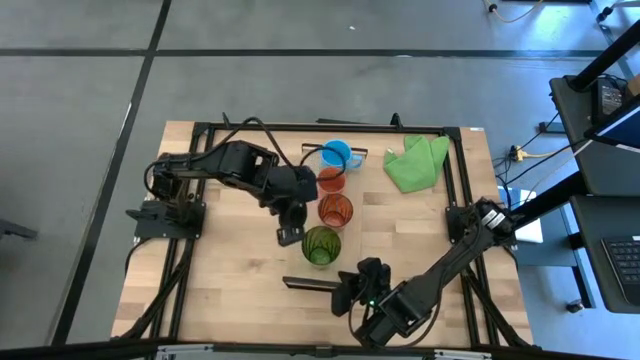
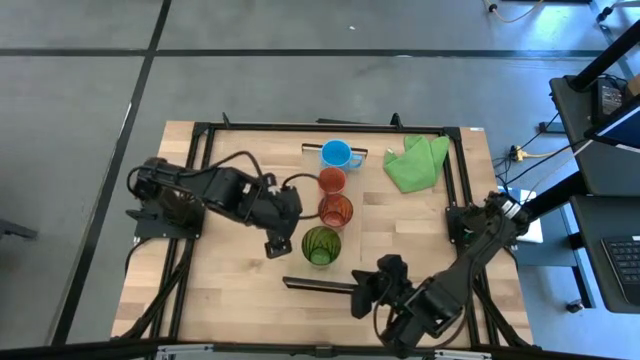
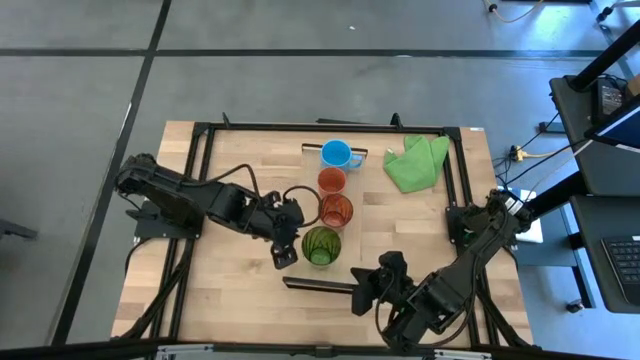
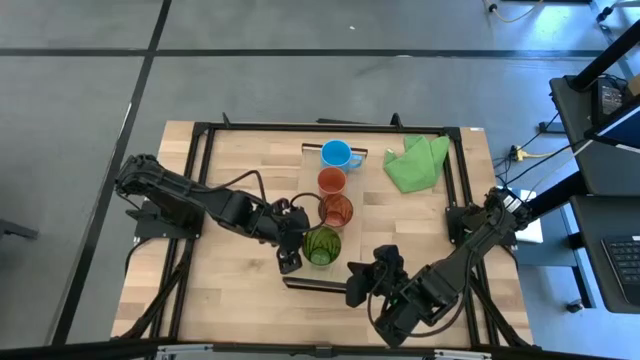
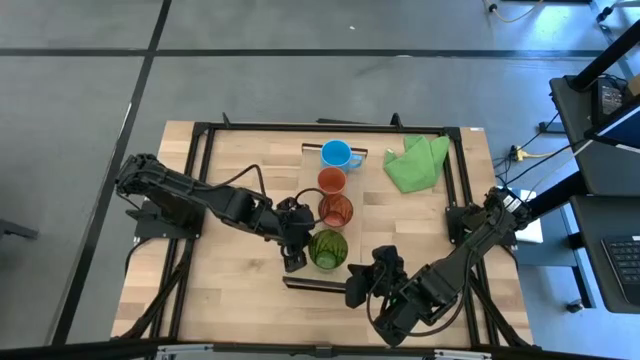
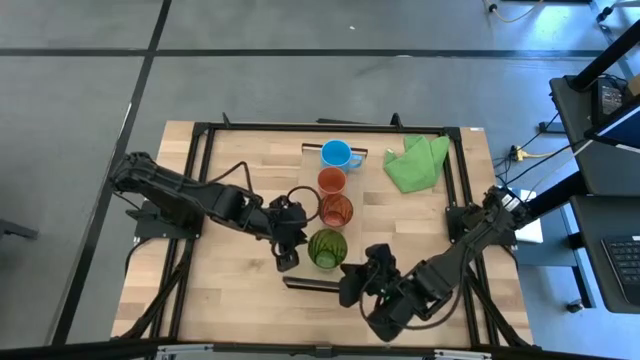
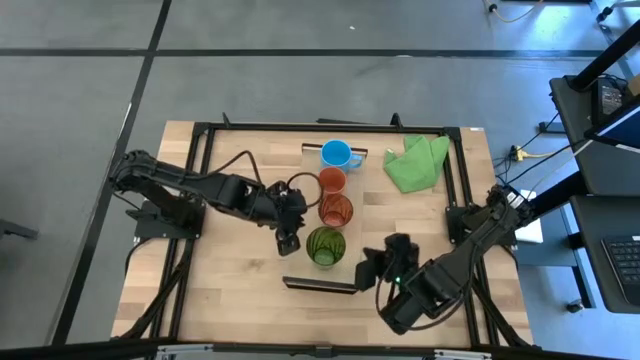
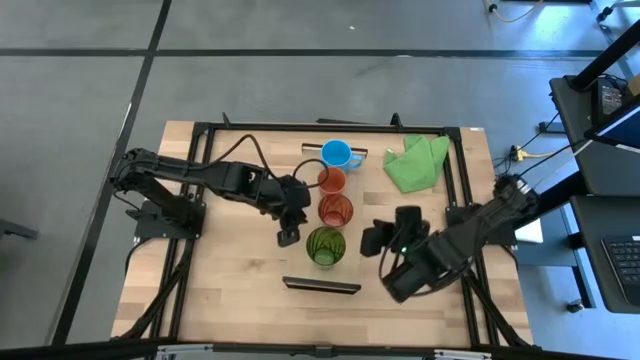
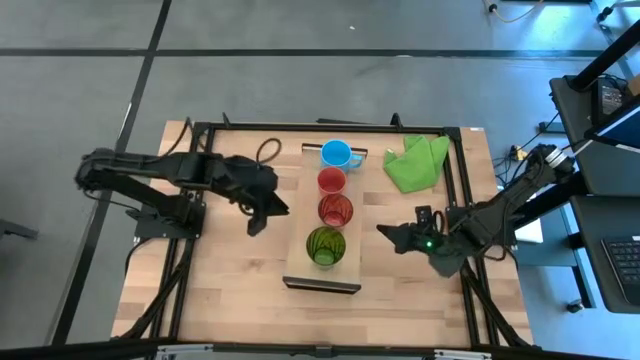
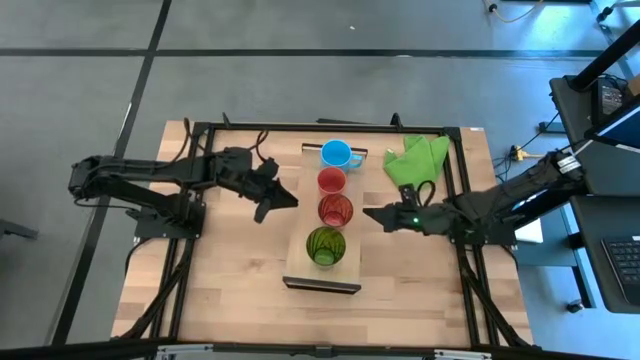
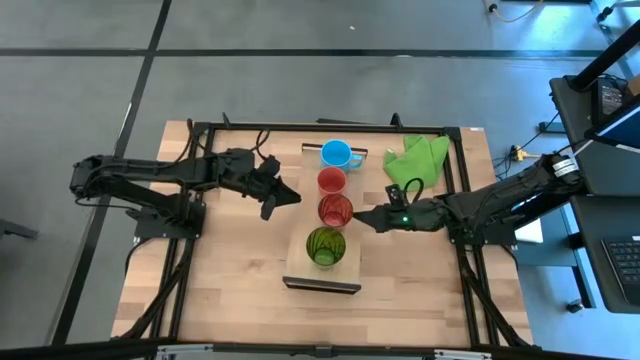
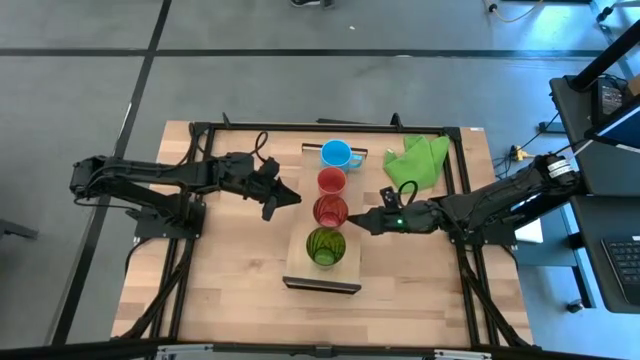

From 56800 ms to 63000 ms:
Task: Stack small to large cups/mugs on shelf
Adjust the cups on the shelf

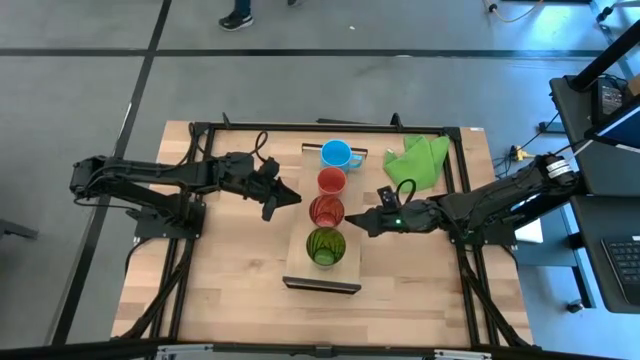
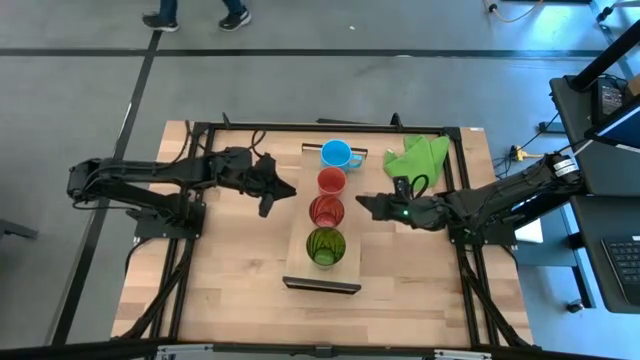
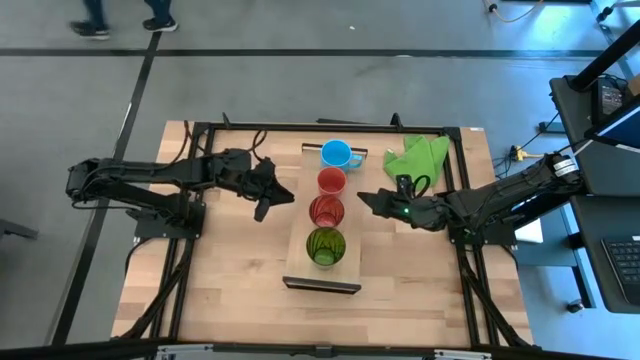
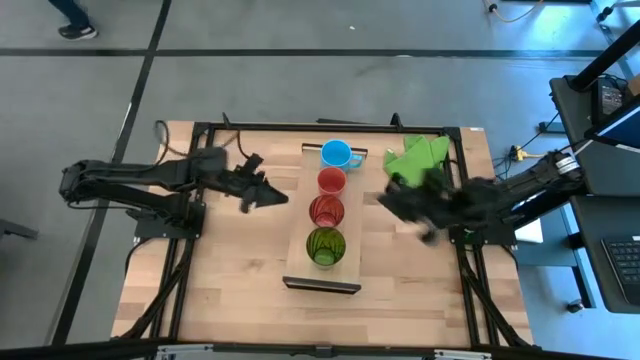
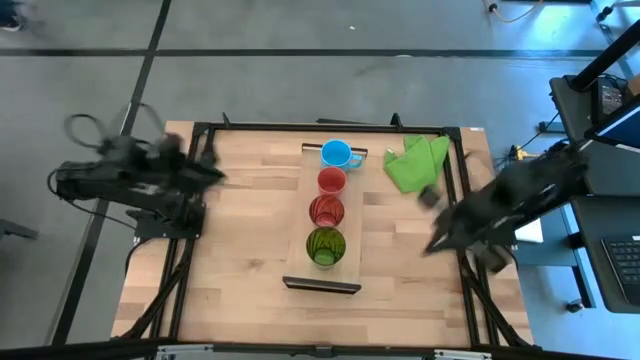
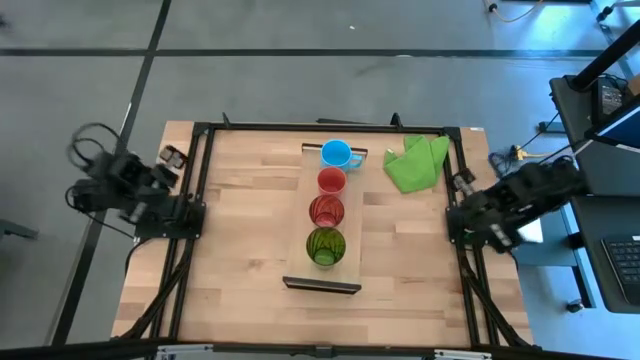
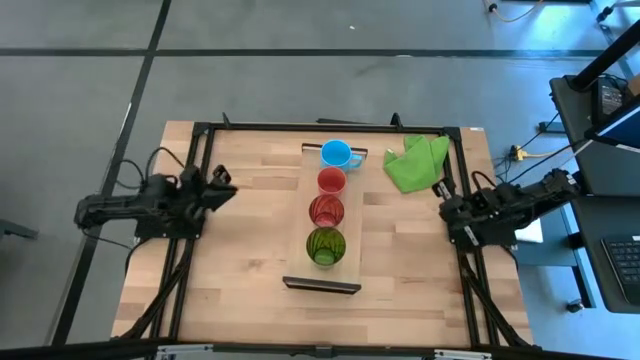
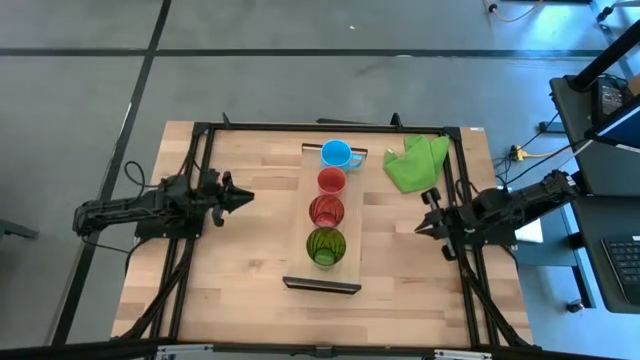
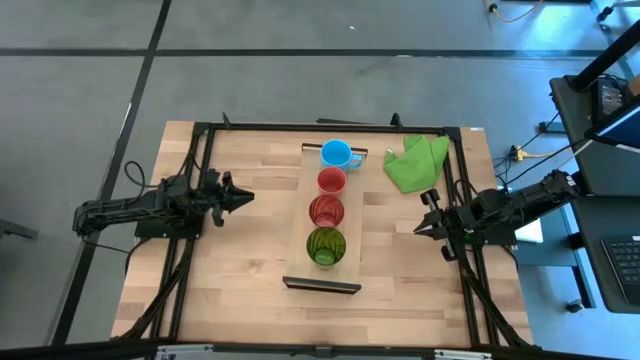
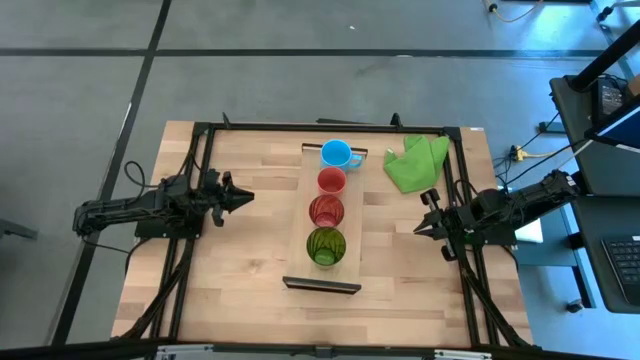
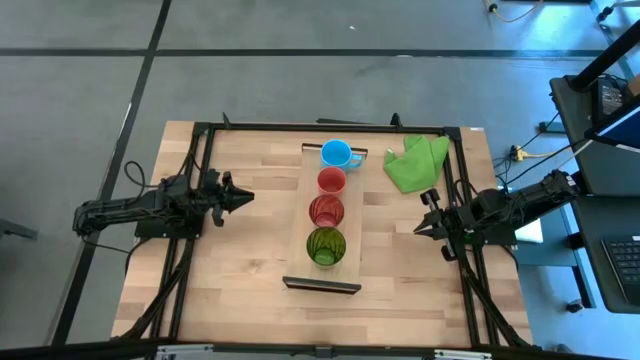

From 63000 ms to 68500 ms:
Return to Home Position

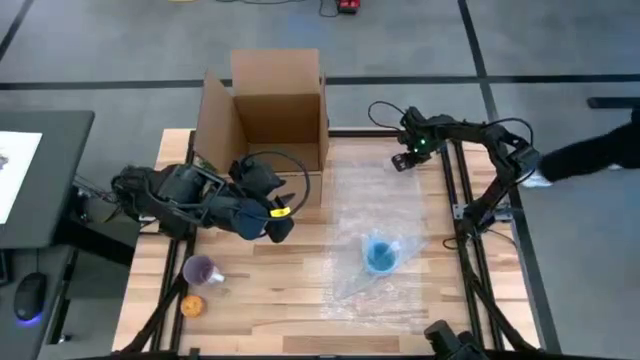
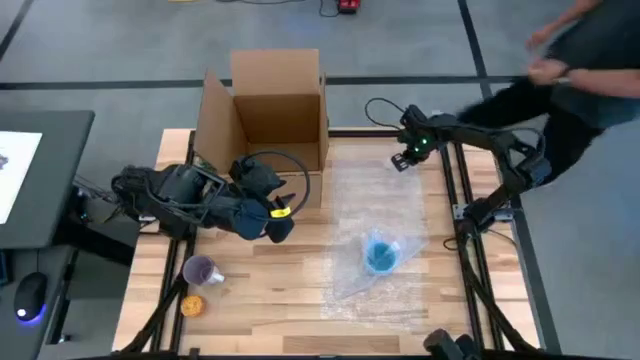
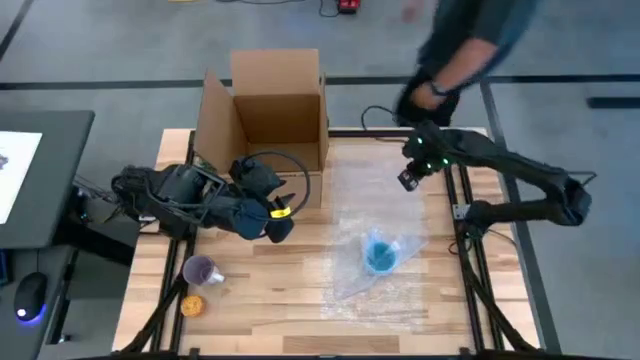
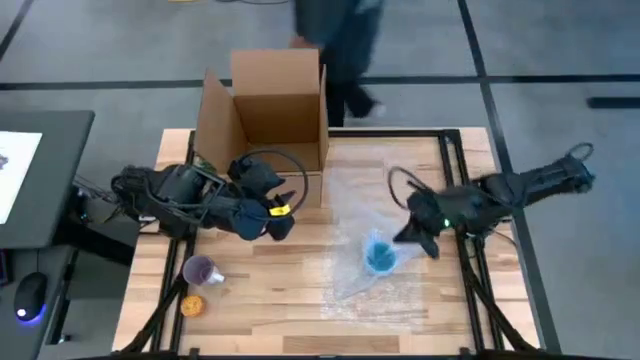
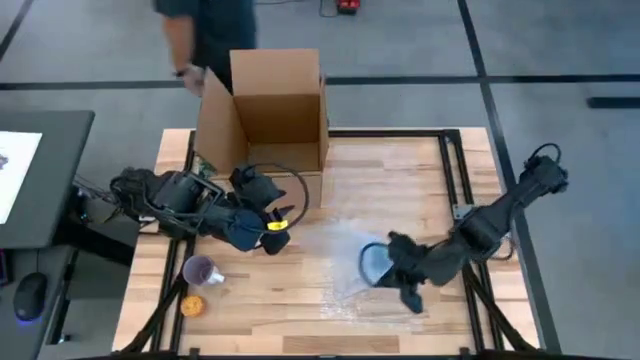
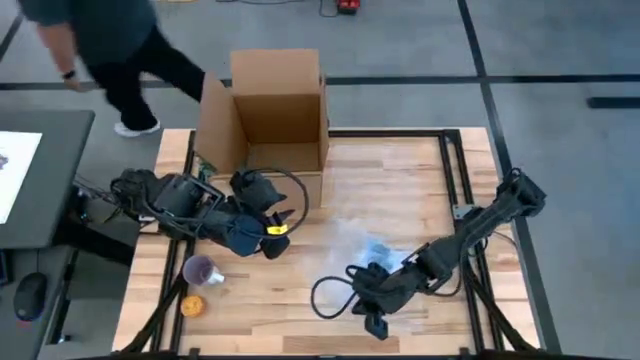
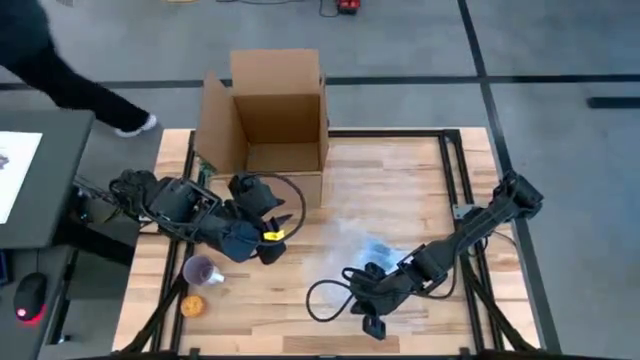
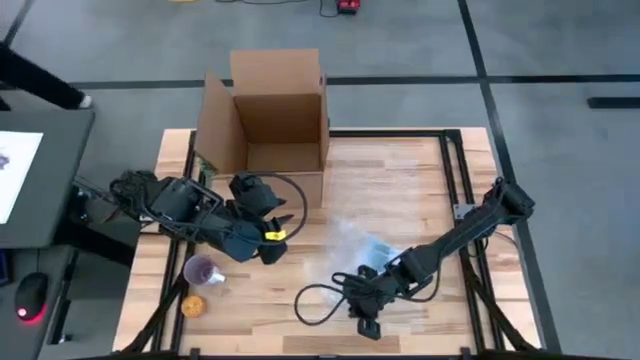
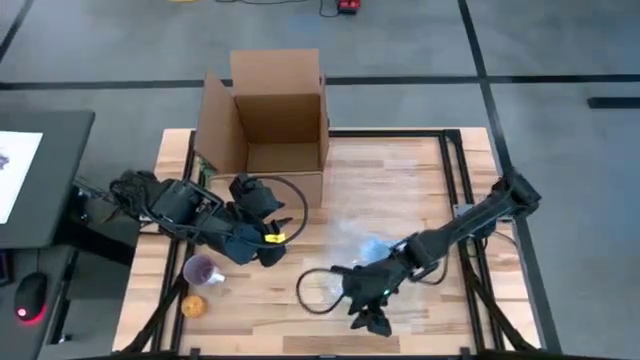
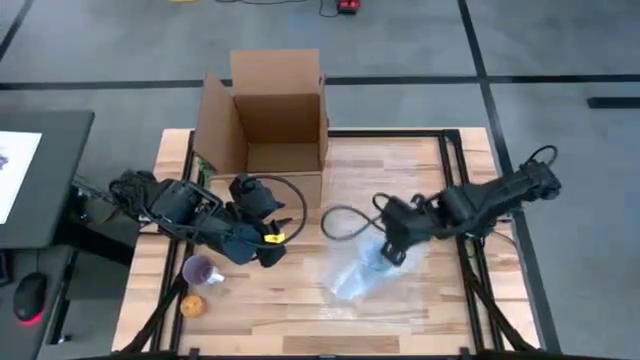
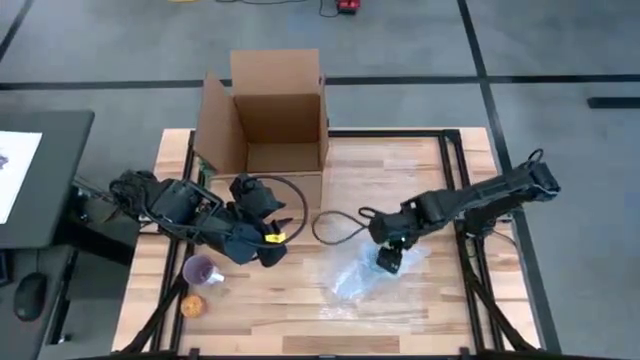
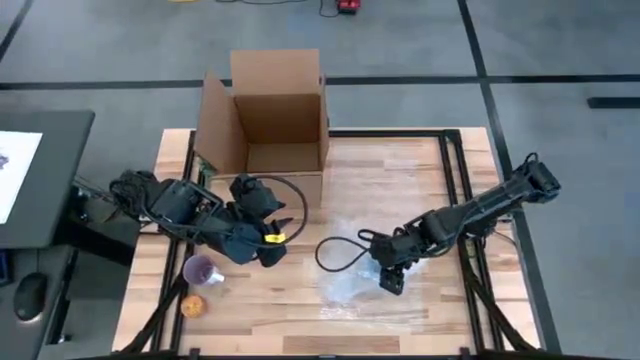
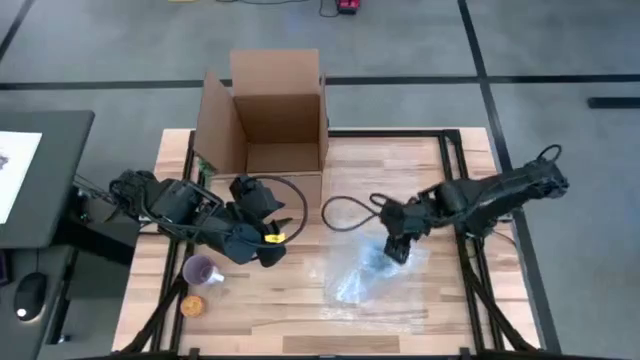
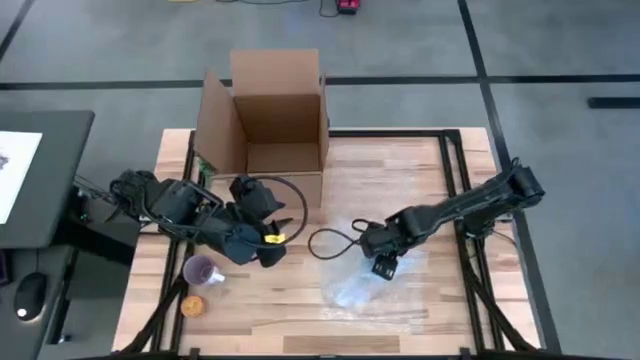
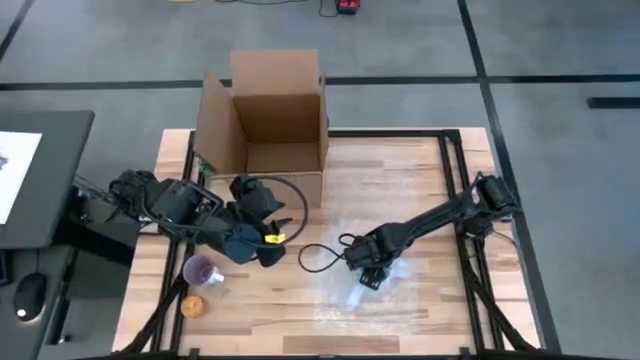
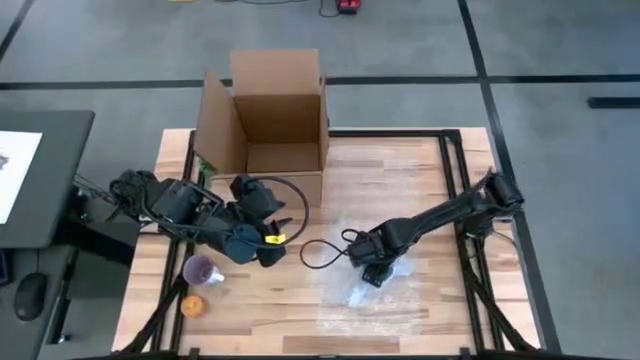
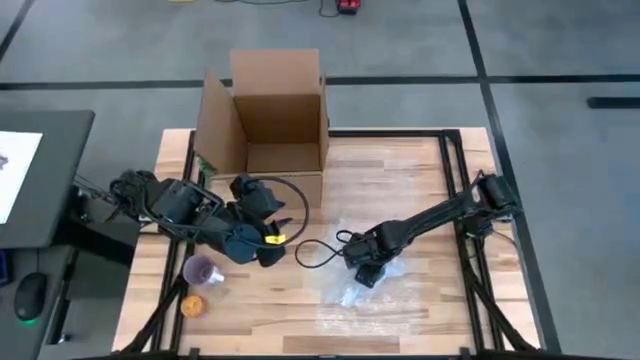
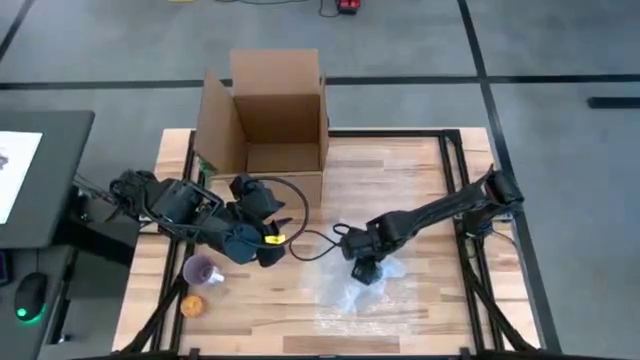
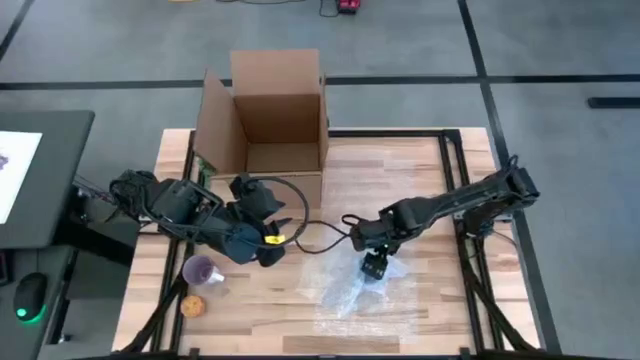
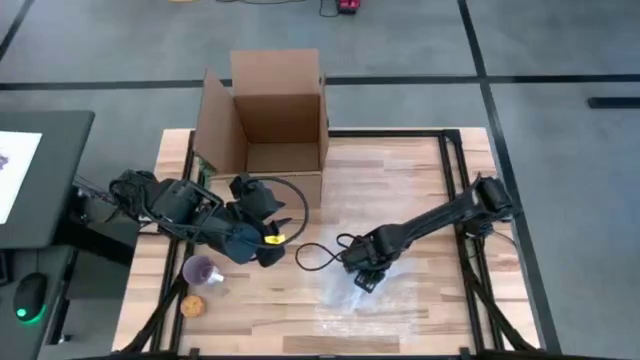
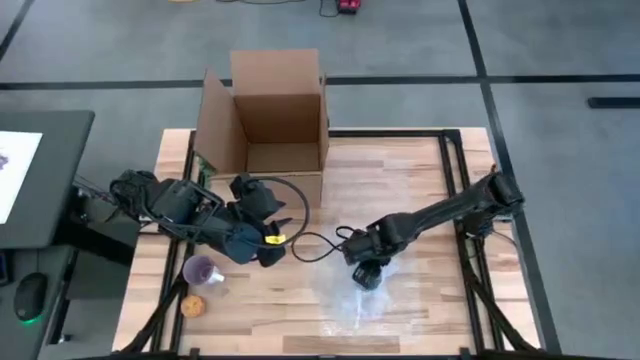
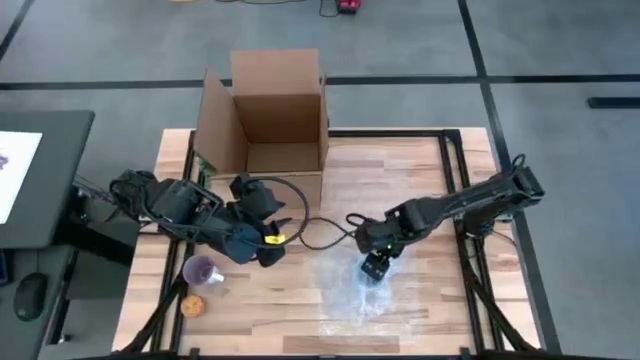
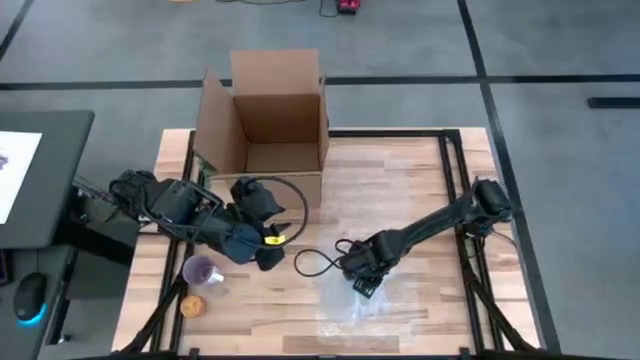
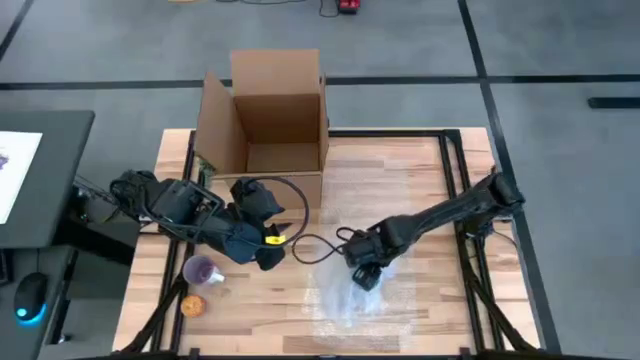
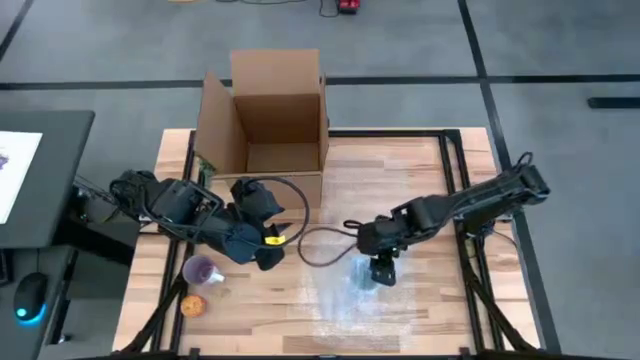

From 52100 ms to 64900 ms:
Task: wrap mug
Wrap the blue mug with the bubble wrap
